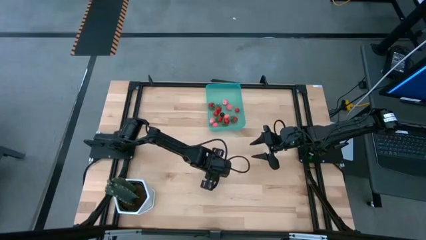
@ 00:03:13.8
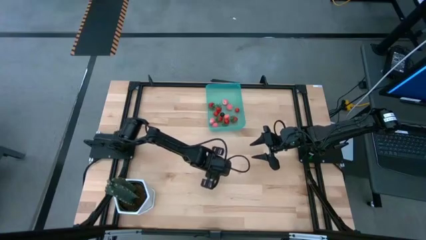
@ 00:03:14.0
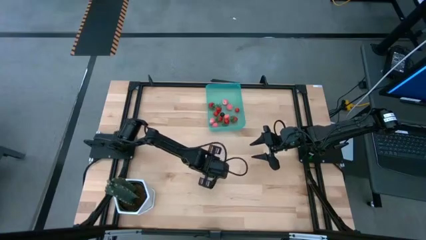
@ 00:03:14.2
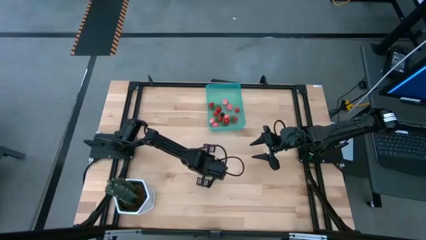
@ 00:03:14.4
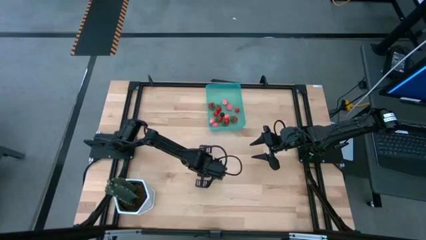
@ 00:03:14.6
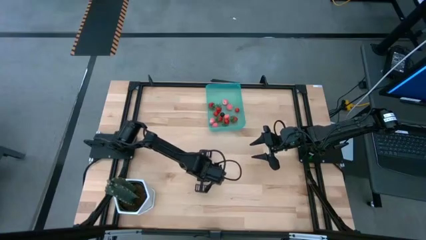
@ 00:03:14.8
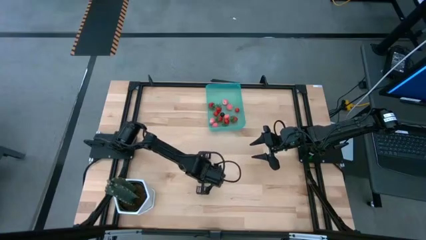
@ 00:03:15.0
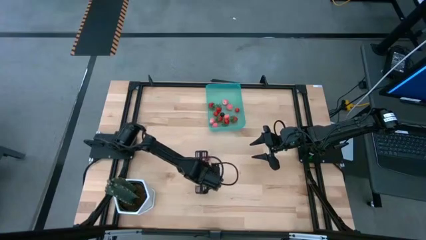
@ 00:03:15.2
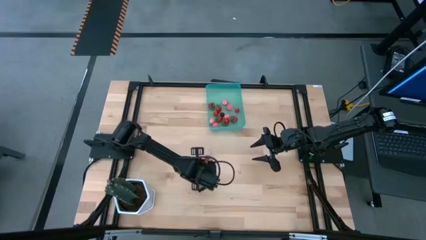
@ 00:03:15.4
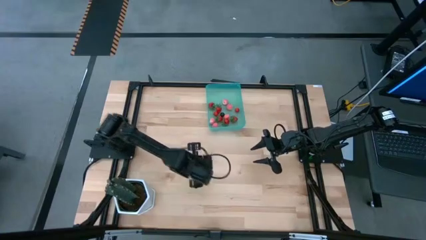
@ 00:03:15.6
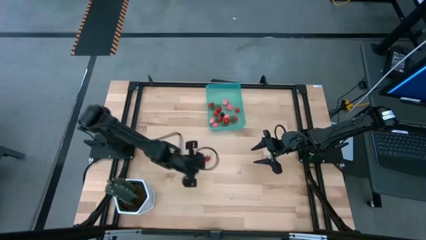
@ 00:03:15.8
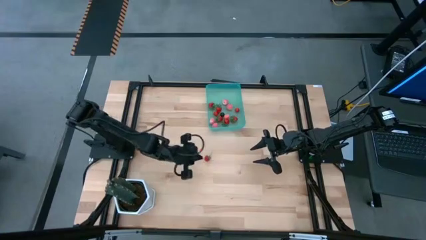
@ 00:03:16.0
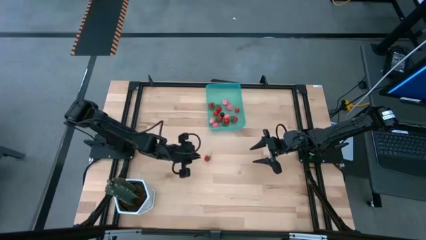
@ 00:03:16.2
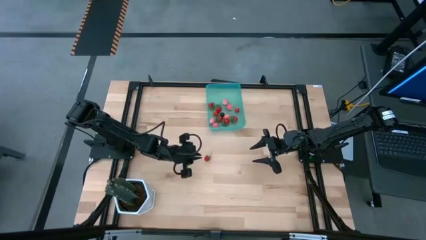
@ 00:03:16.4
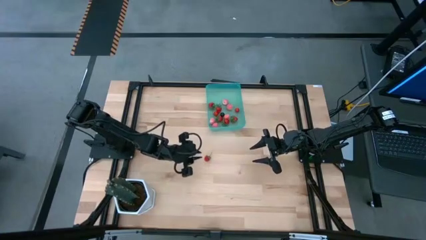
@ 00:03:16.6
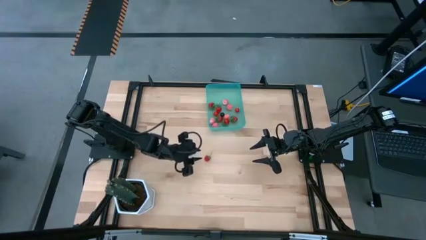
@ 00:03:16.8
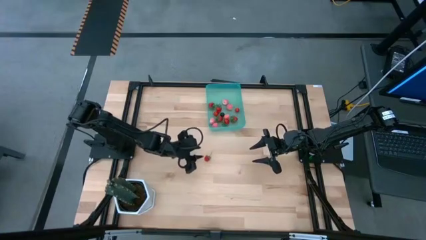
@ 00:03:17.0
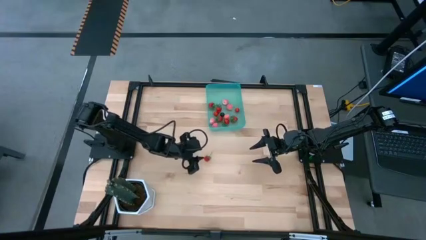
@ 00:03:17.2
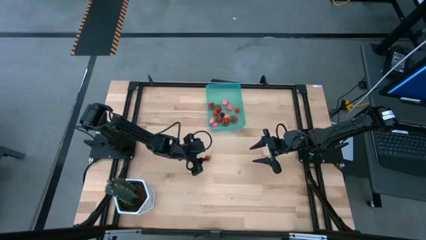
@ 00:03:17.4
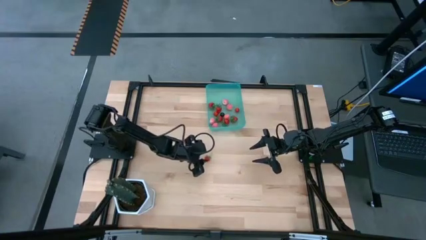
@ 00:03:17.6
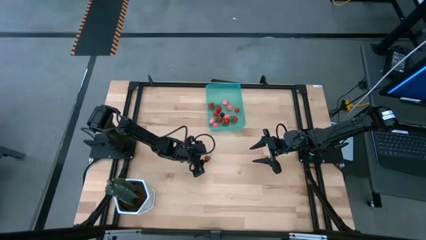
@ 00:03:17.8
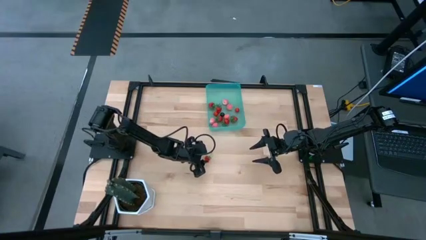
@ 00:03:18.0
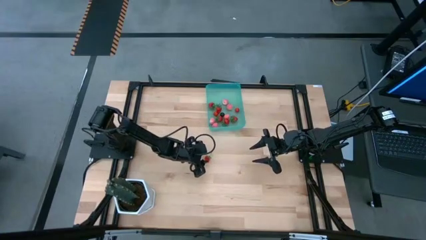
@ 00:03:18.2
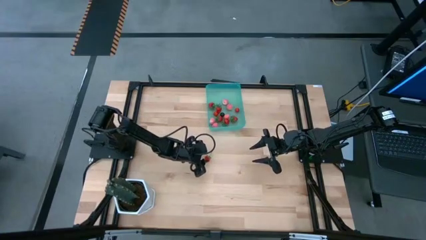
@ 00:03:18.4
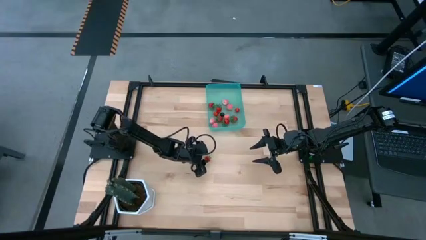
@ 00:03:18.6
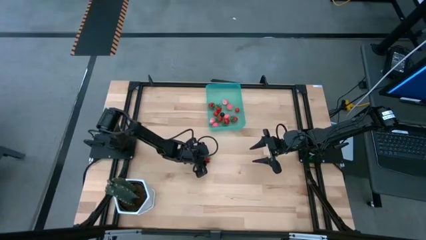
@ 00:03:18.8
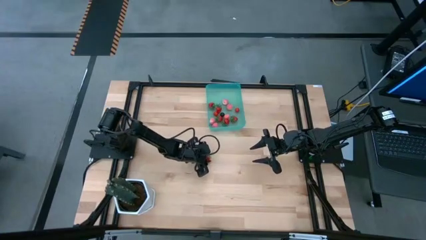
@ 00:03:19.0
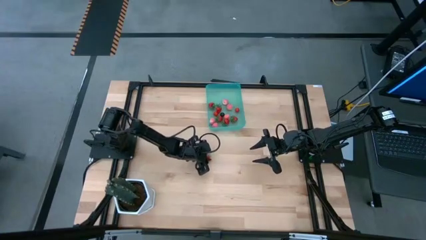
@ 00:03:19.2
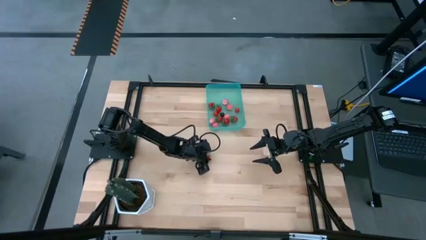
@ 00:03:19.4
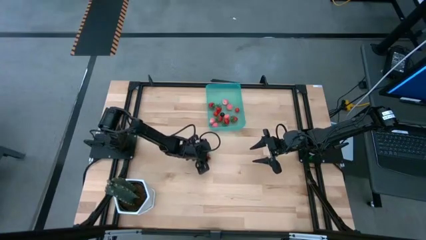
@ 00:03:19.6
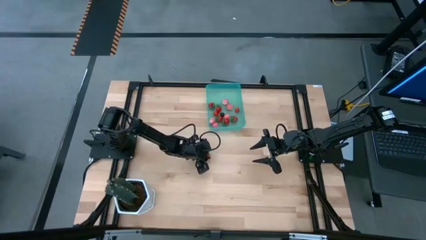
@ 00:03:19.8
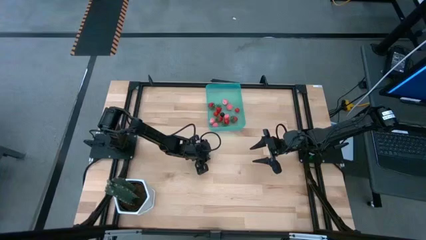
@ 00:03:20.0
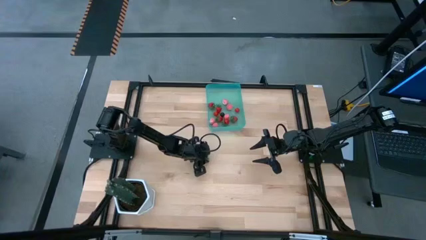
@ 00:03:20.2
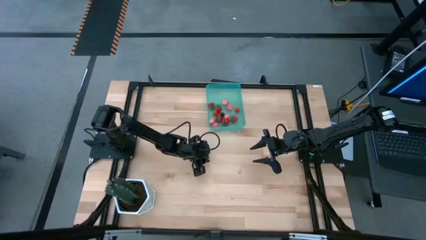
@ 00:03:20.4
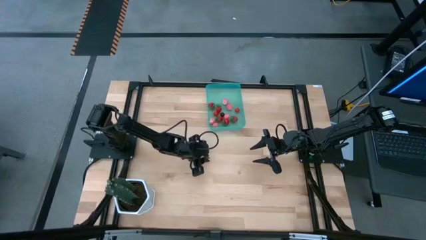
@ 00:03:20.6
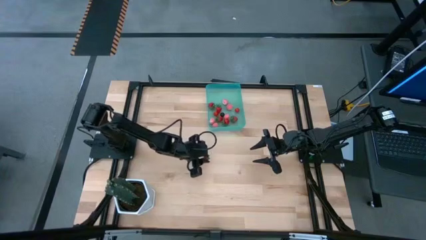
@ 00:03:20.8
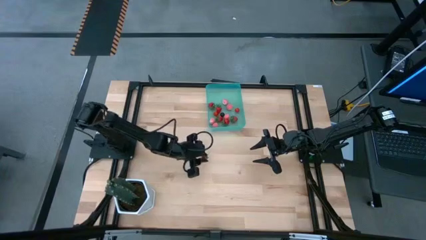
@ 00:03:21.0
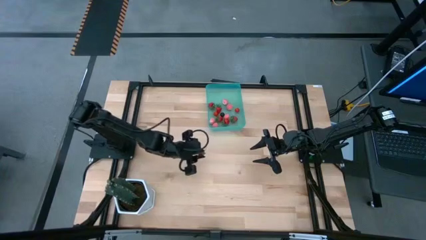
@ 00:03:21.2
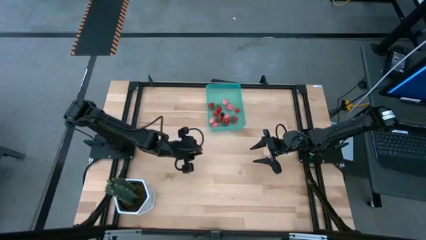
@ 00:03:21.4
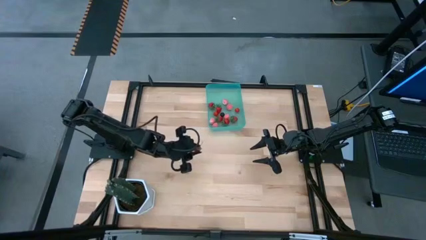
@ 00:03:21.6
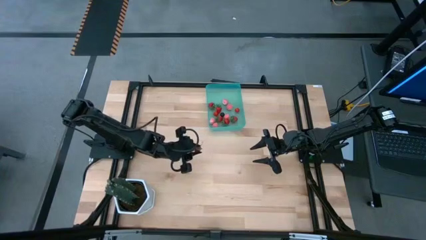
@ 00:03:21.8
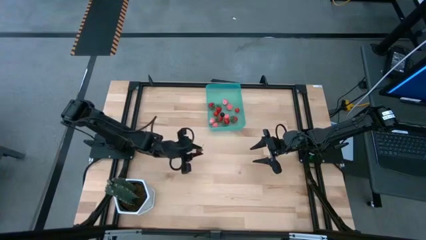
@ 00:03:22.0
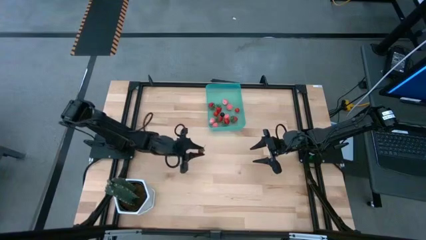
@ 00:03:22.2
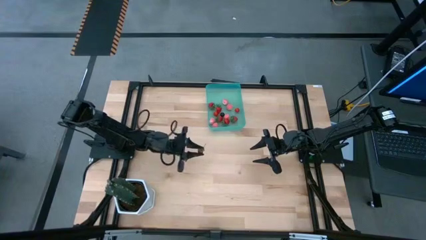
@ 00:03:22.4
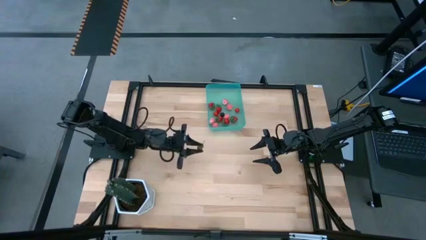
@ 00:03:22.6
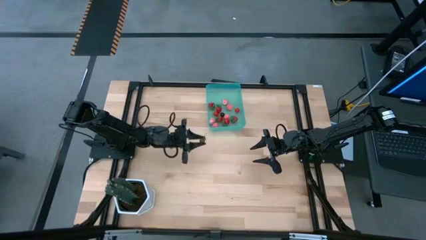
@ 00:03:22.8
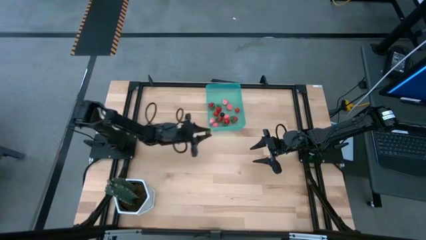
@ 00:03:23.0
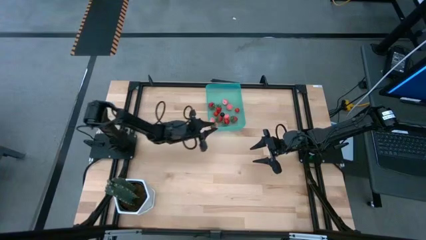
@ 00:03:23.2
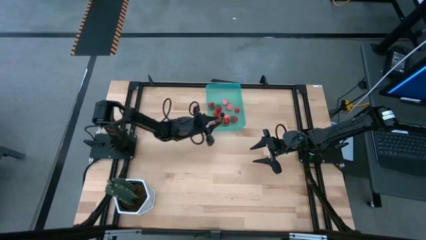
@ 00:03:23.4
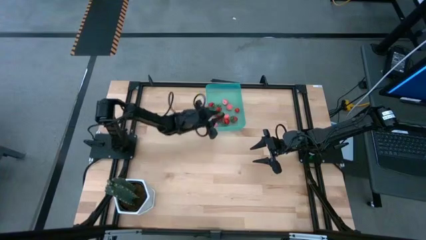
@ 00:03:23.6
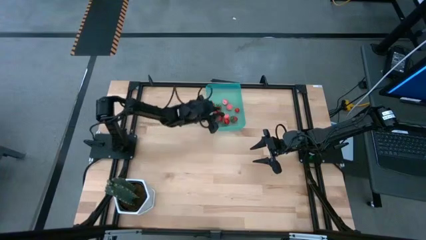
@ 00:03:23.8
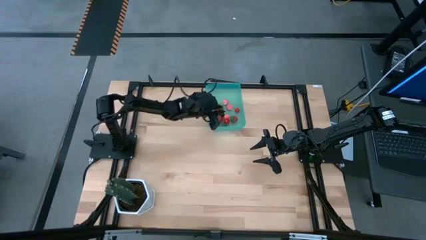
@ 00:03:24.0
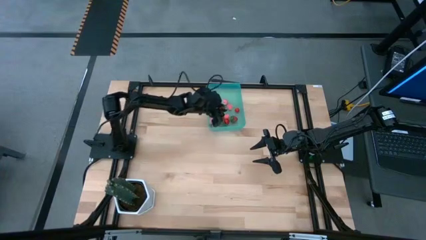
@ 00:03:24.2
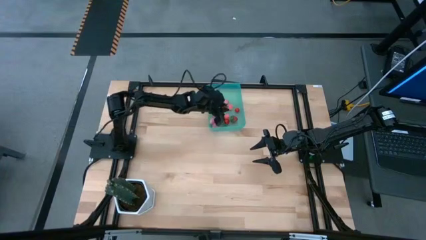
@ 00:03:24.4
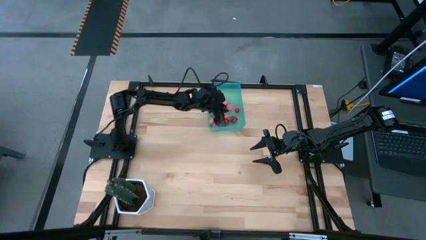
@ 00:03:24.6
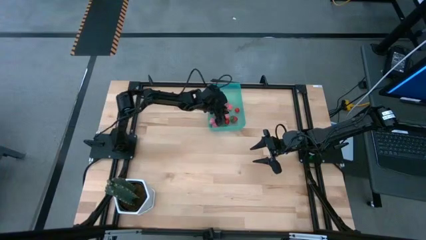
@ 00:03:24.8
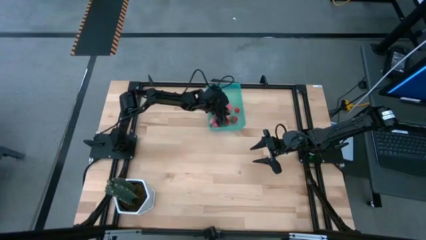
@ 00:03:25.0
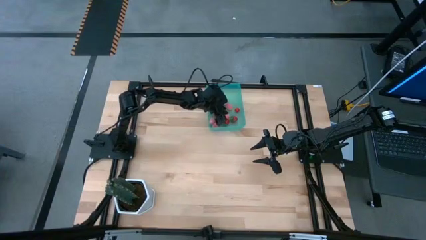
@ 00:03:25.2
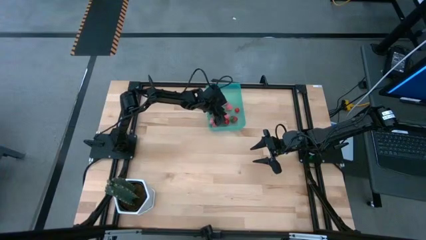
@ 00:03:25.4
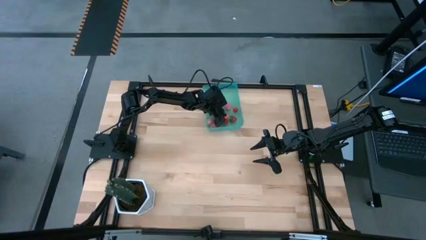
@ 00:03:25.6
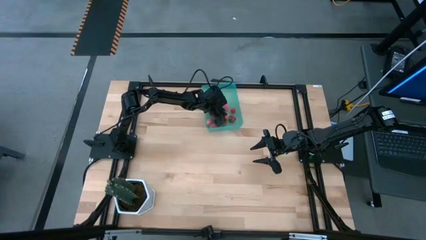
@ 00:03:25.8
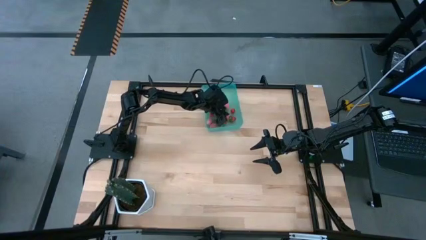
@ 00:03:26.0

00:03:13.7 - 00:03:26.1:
Task: Pick and placing Produce into tupperware
Put the red strawberry into the blue bin

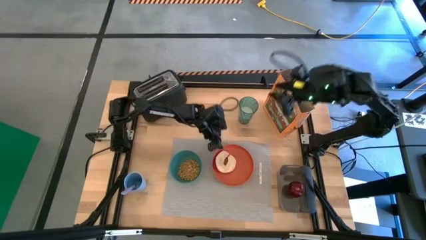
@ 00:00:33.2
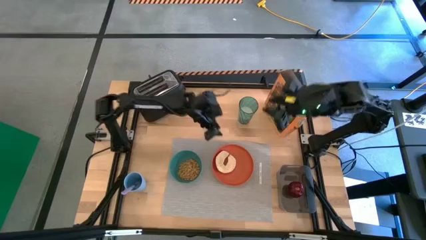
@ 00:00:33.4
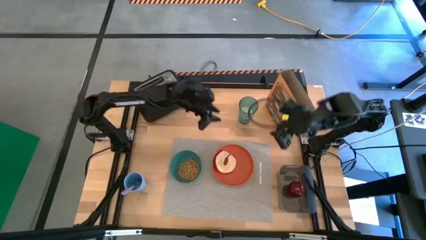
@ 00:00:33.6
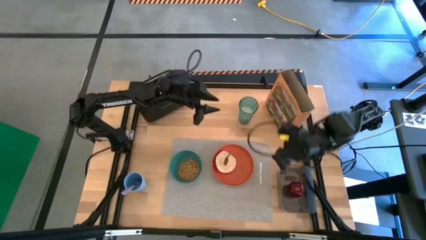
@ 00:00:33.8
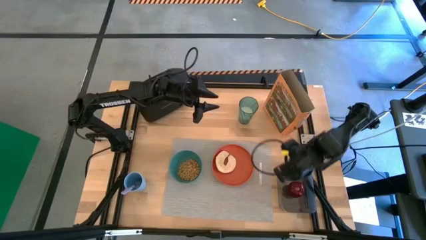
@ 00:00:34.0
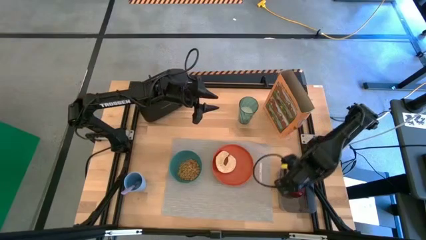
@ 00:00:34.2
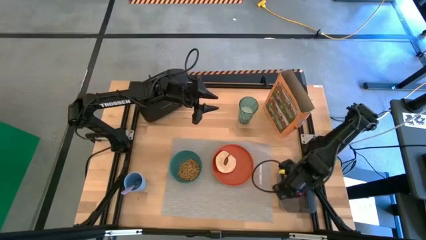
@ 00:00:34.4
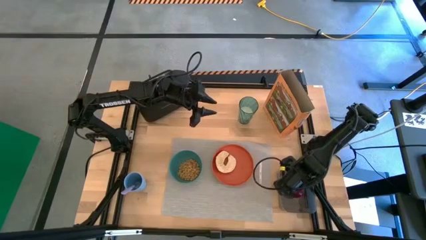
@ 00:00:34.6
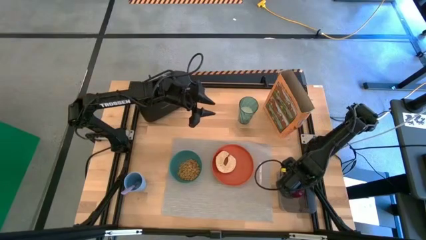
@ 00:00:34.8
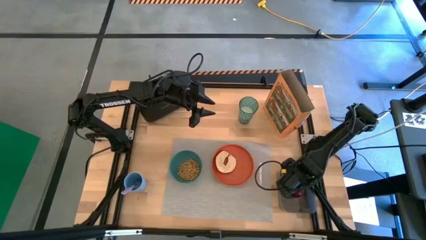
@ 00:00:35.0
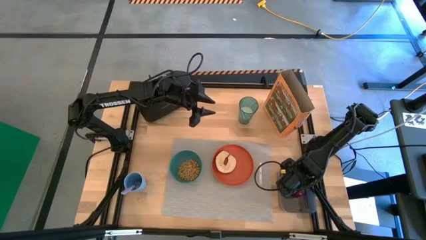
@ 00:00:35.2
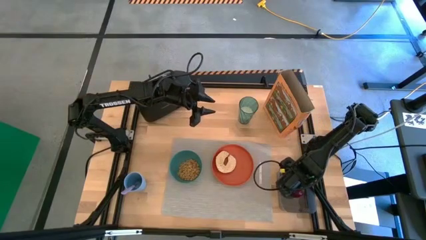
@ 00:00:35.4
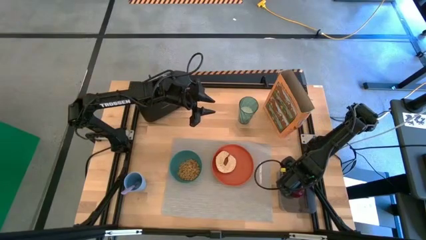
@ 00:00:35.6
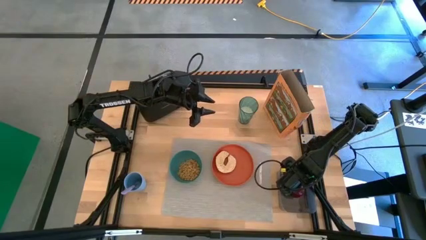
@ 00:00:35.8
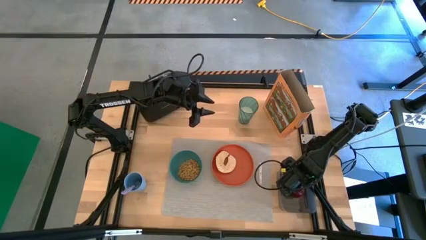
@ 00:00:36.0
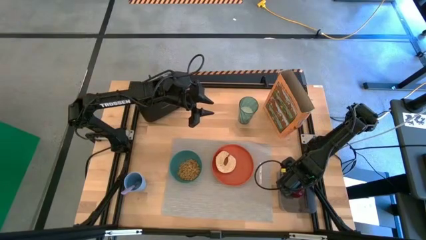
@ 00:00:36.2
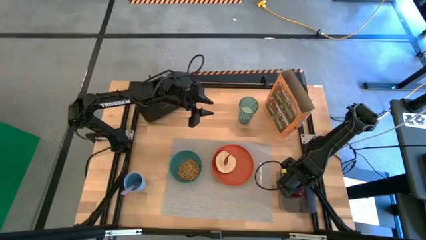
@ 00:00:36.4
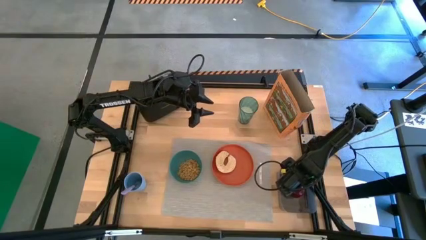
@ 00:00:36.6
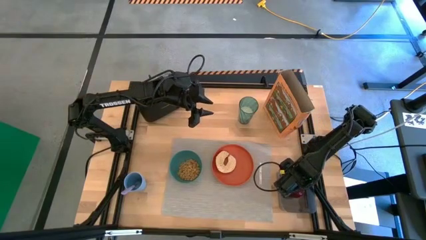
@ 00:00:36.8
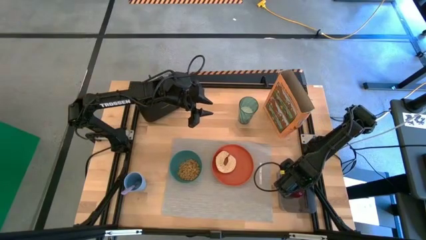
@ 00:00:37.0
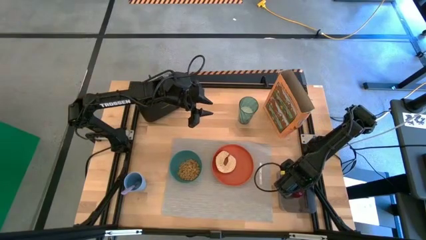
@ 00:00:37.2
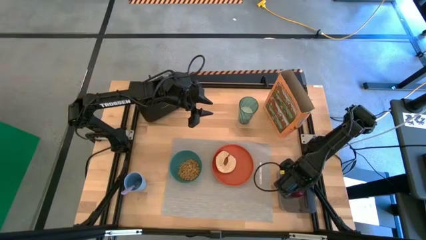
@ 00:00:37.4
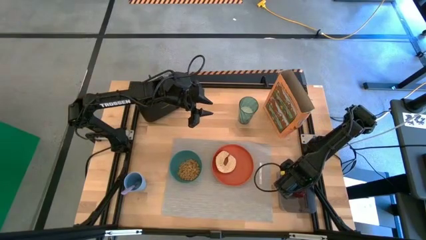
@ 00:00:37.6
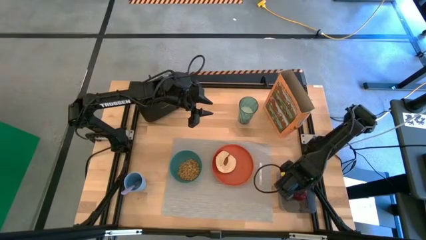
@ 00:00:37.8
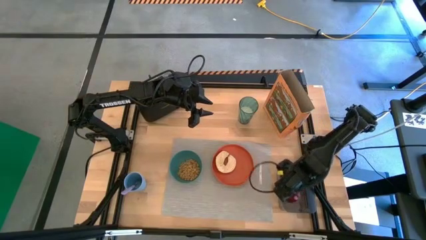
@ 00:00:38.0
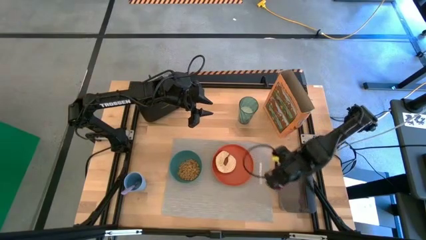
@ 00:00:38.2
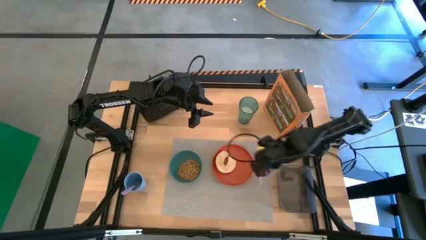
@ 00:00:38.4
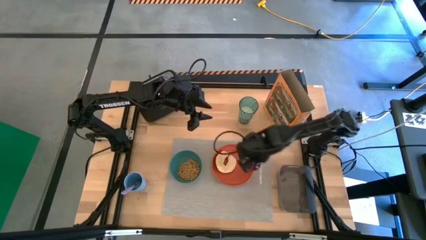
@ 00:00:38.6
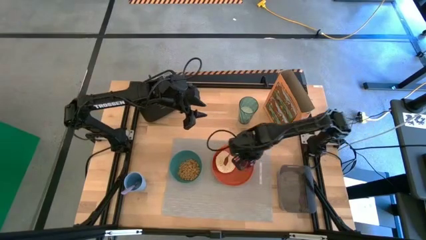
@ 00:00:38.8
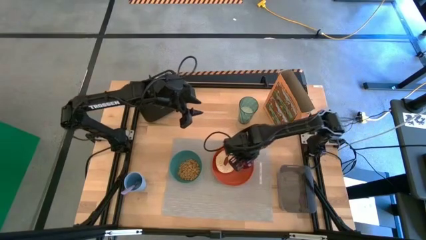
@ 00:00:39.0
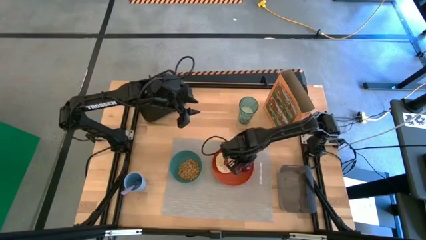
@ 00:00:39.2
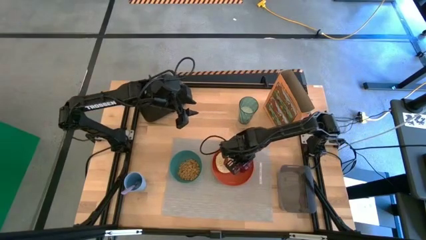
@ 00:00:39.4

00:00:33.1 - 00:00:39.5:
Task: Arrange a breakfast setting
Put the apple into the orange plate
